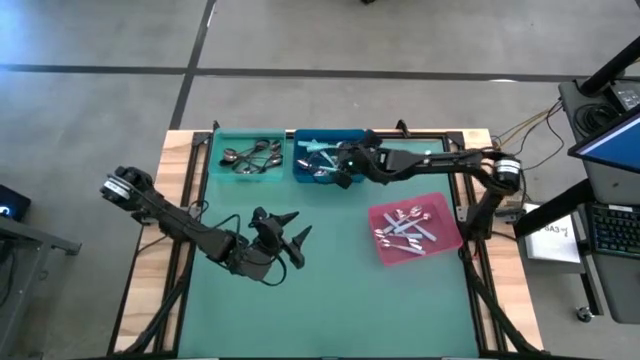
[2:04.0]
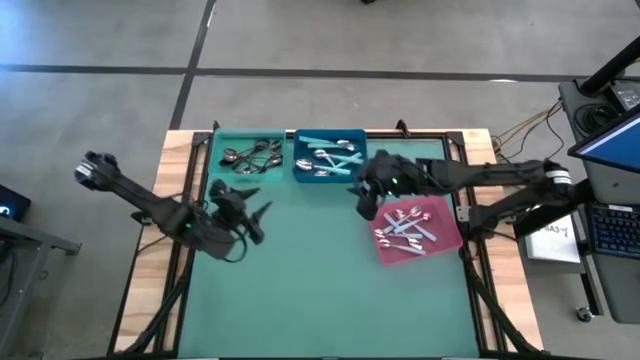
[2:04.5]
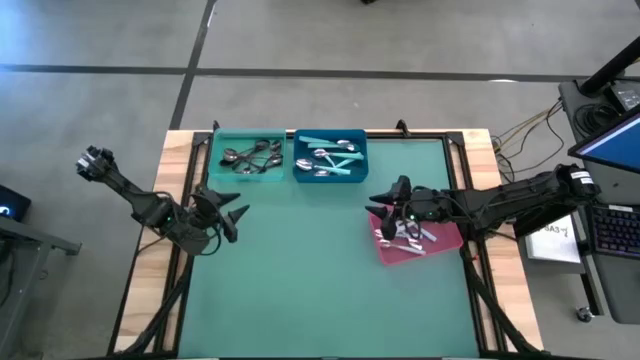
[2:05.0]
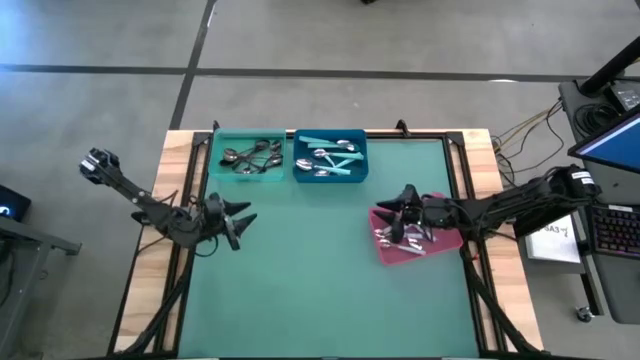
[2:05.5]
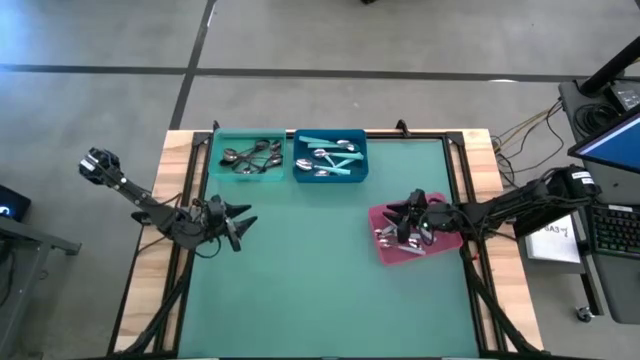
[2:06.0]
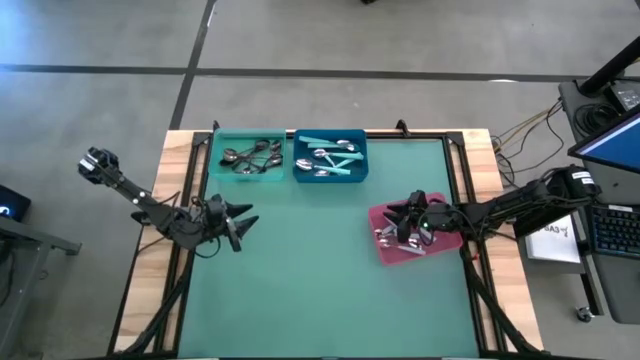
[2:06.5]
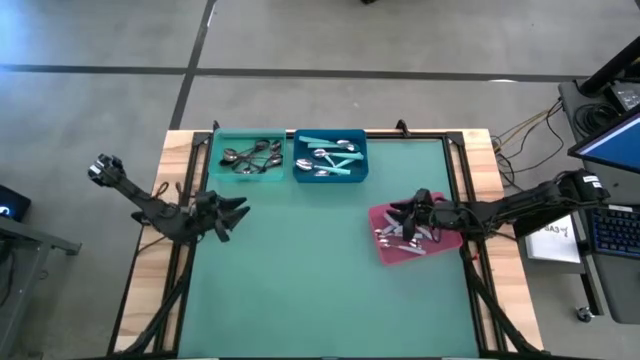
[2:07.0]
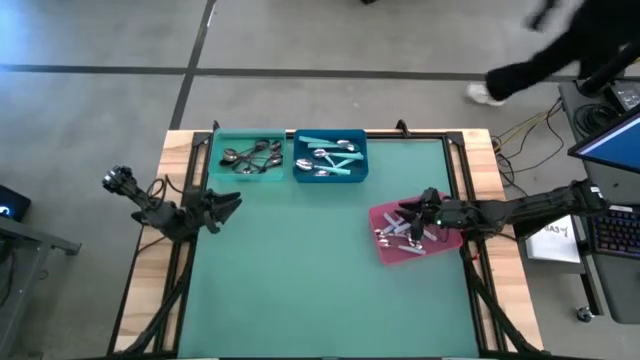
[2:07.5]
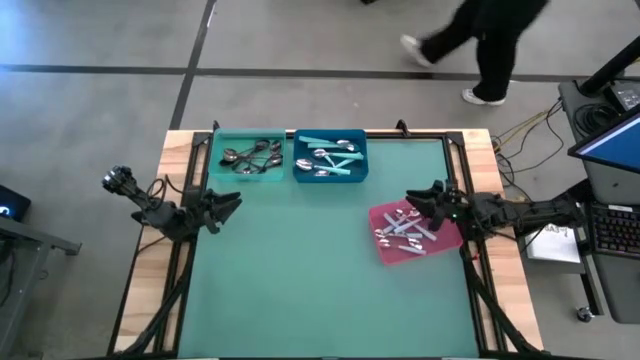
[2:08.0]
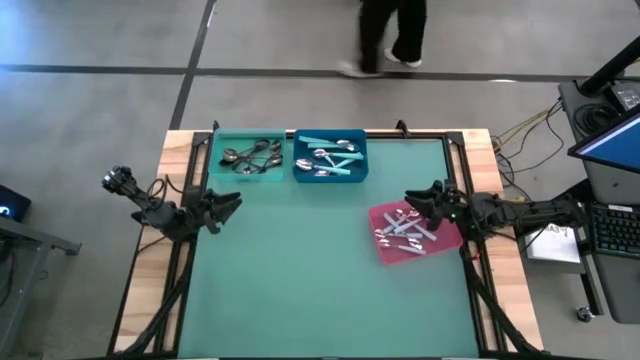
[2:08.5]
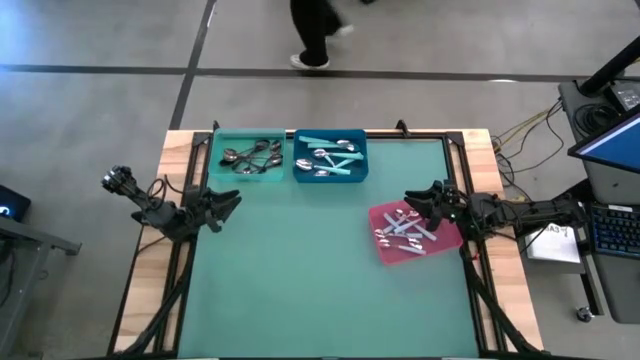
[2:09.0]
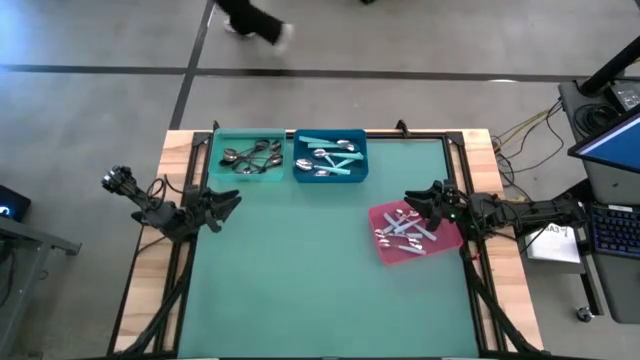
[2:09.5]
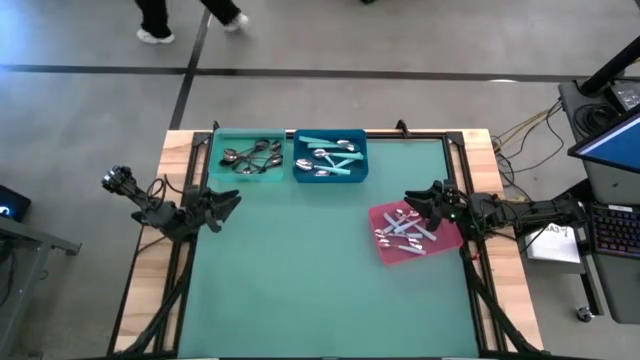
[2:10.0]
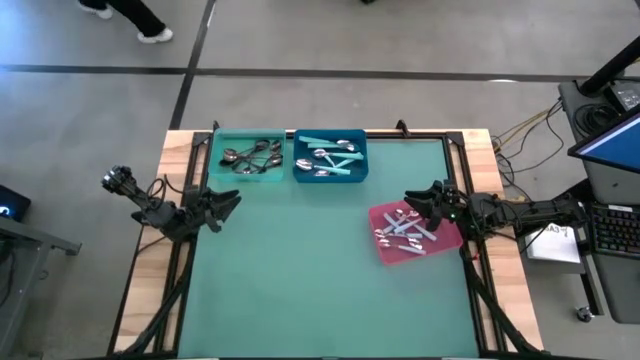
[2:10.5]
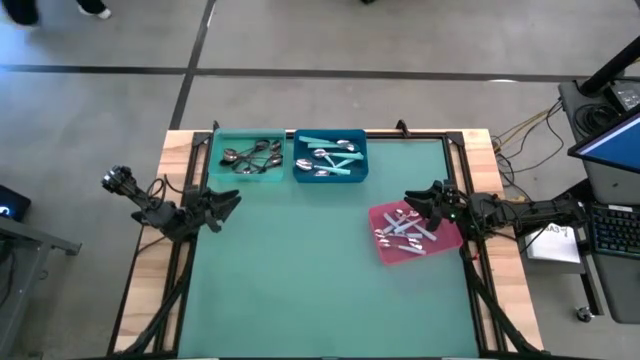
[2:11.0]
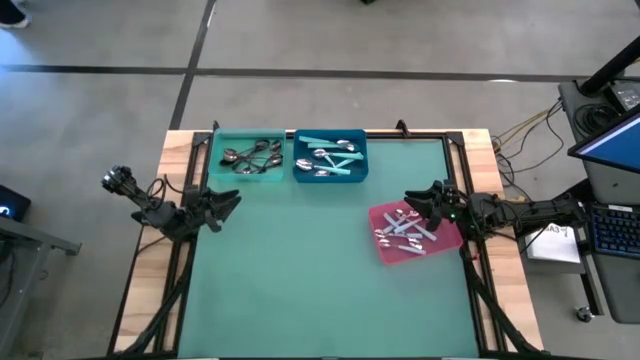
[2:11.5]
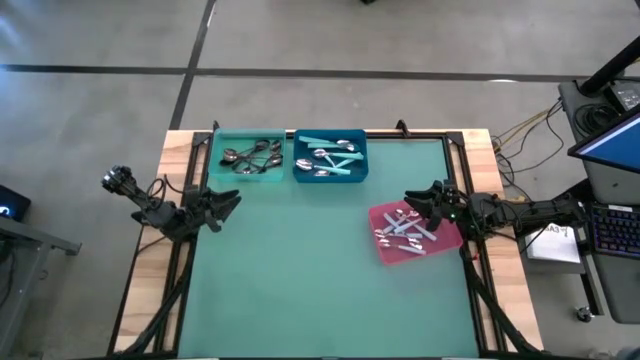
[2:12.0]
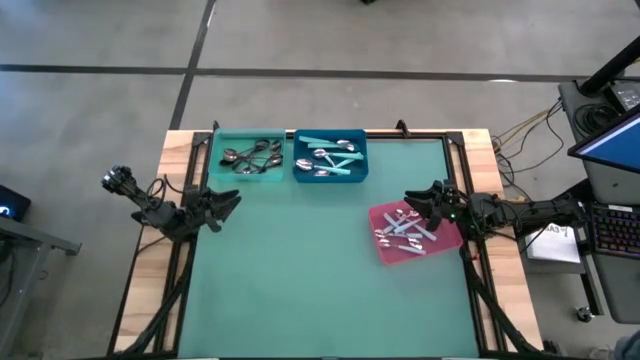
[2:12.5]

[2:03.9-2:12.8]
Task: Sort silverware by color (type)
Return to Home Position
